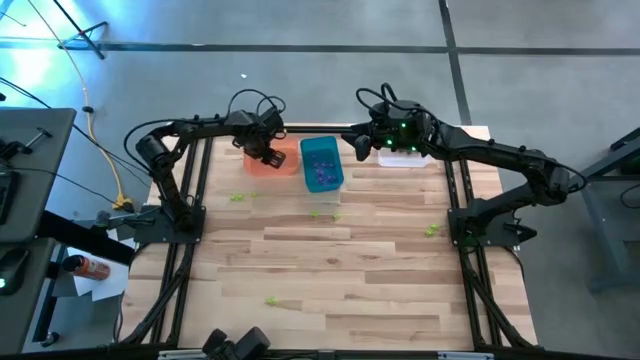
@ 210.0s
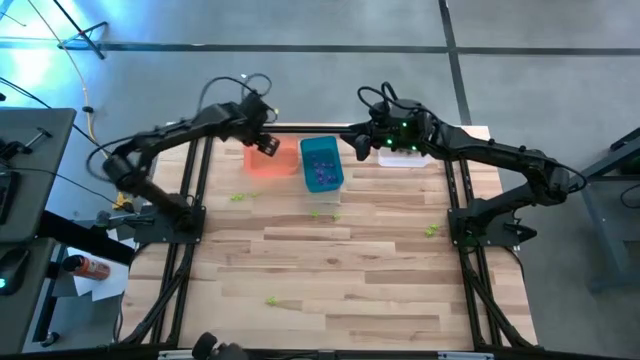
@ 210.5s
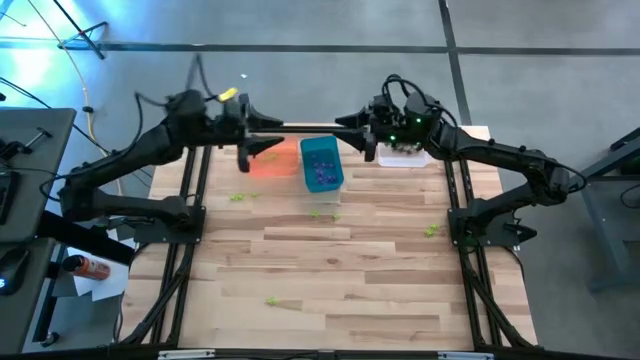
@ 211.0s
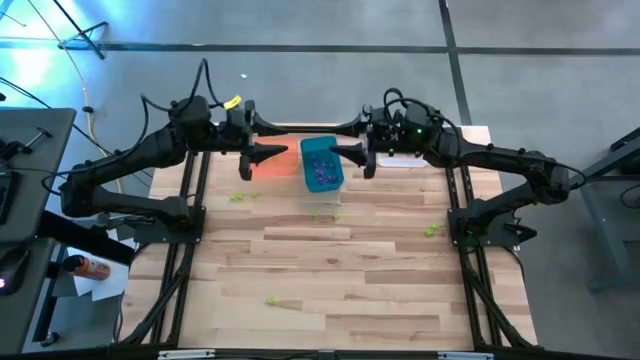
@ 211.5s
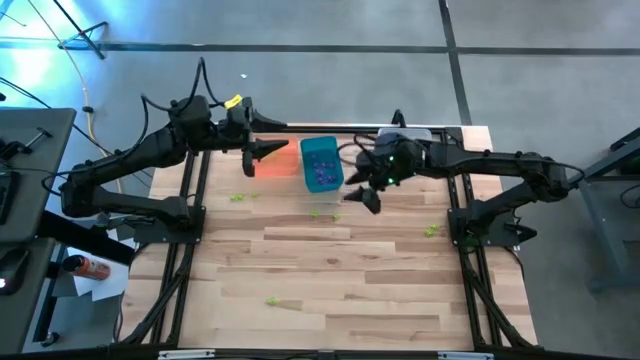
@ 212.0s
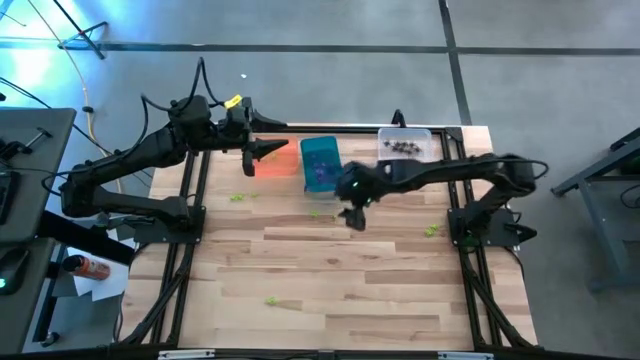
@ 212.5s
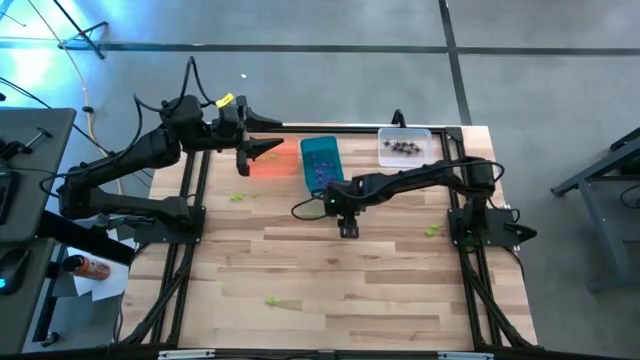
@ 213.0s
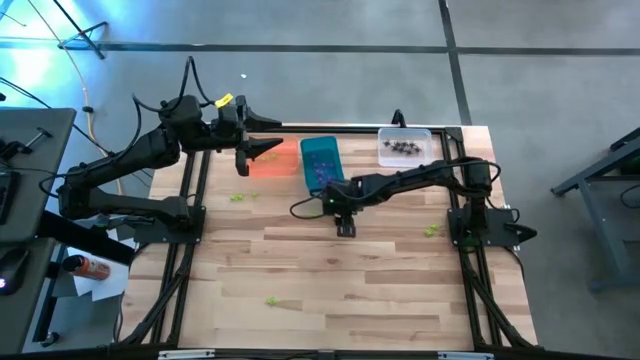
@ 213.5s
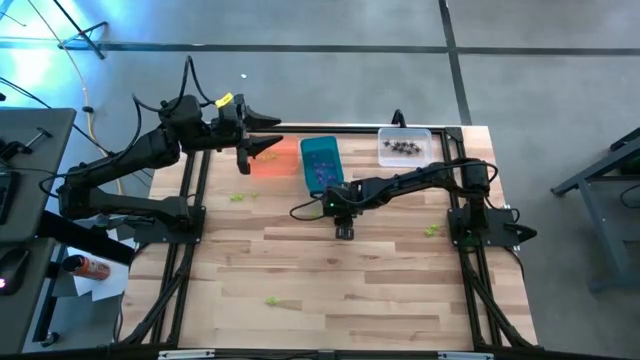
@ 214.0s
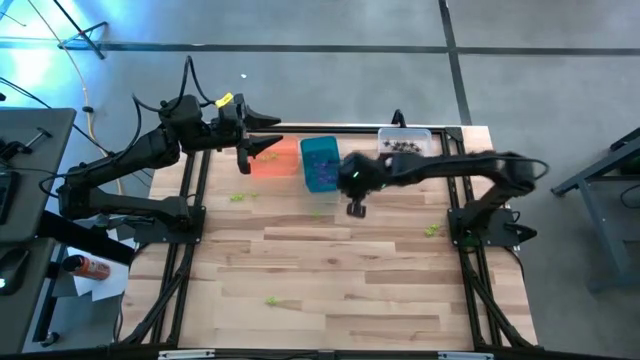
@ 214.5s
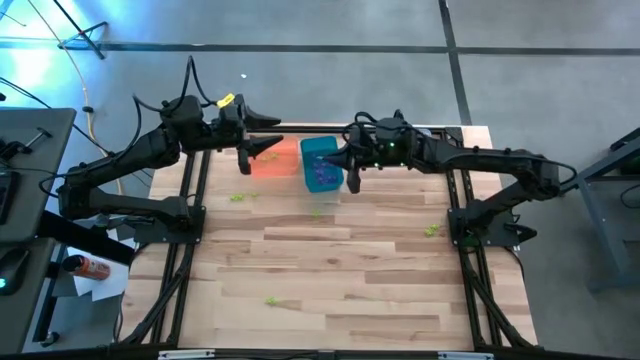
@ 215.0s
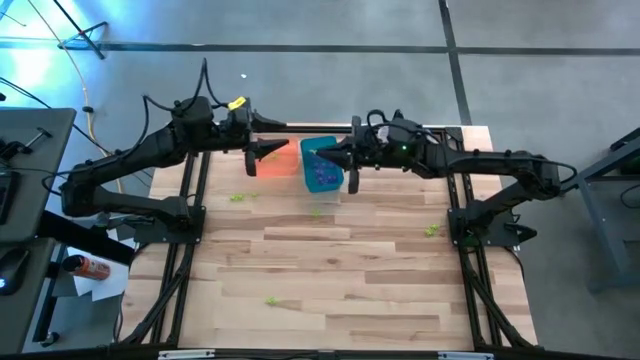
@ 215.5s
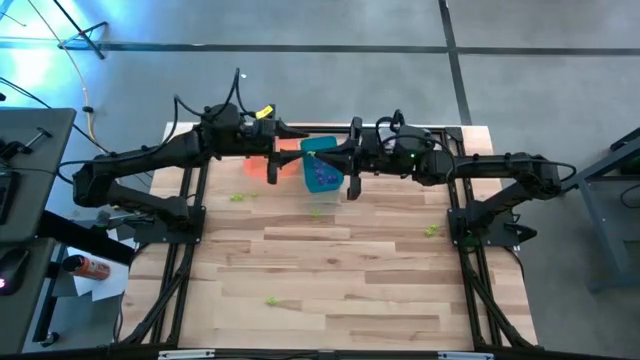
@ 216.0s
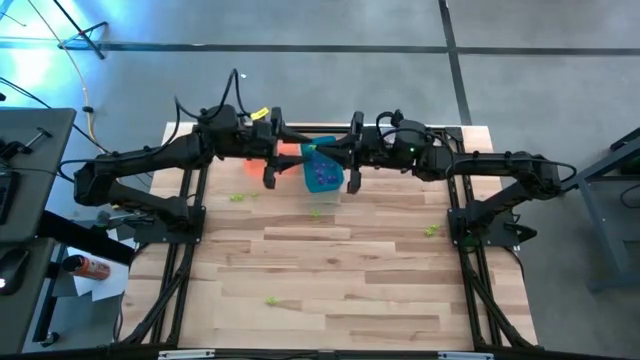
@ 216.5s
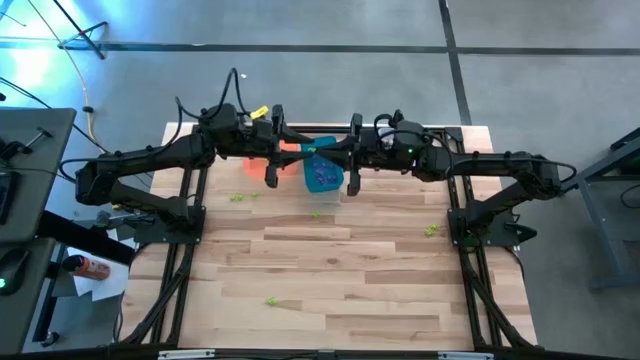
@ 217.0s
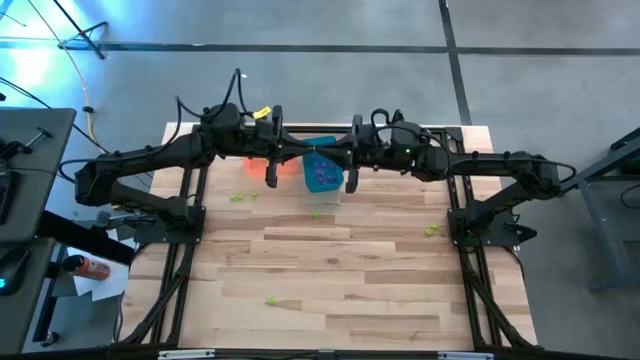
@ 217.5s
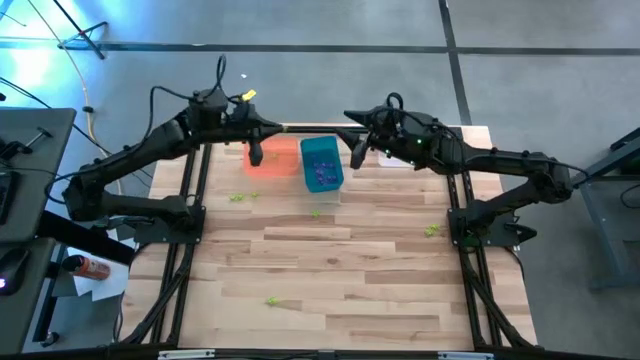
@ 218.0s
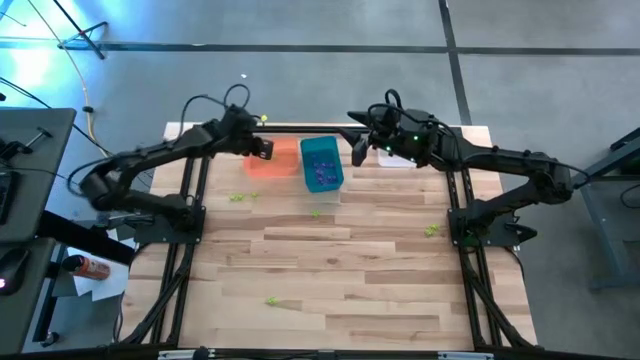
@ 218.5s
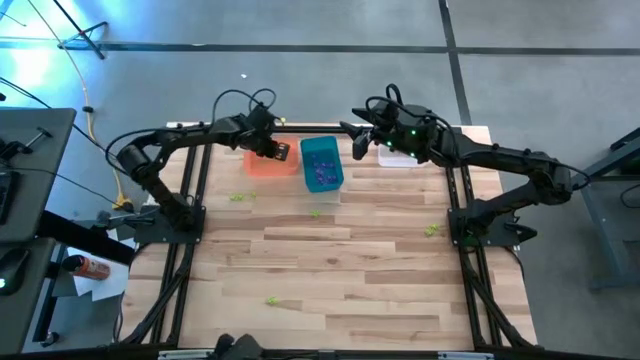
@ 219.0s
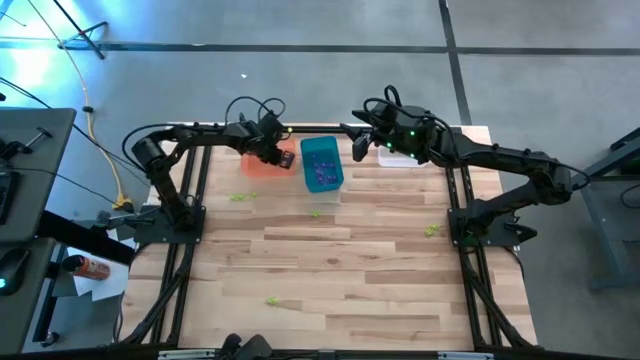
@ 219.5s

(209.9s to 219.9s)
Task: Sort Halloween decoration
Put the green spider toy into the orange bin

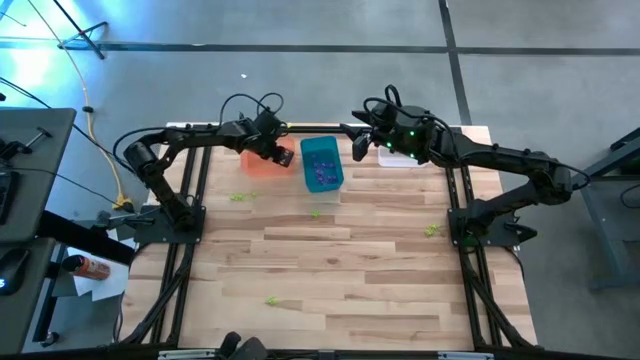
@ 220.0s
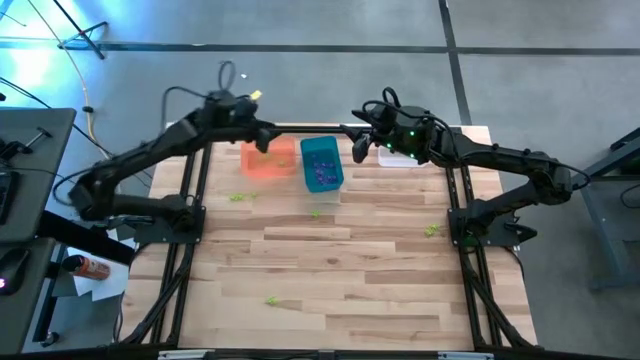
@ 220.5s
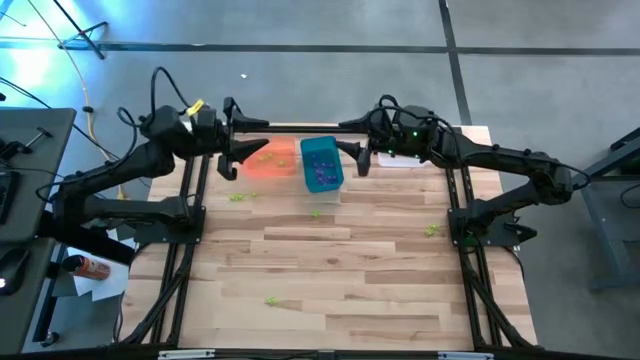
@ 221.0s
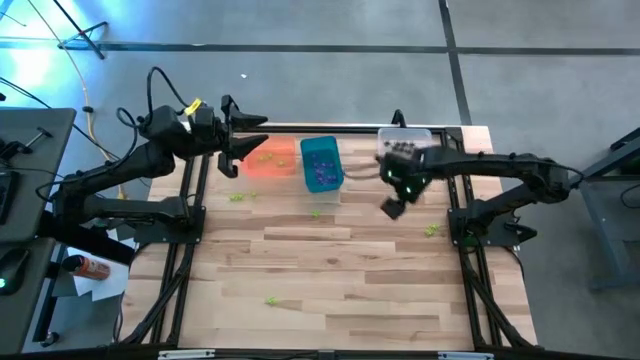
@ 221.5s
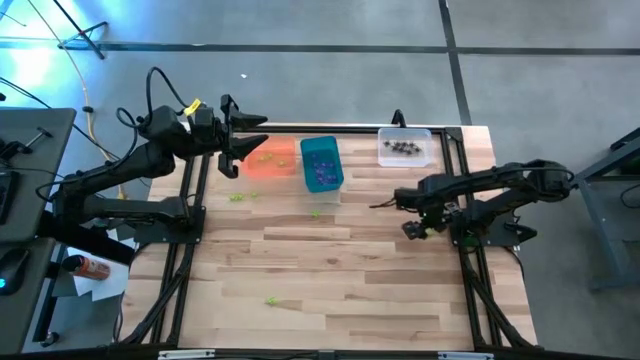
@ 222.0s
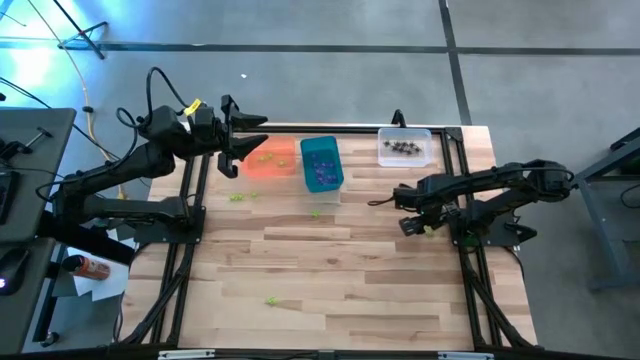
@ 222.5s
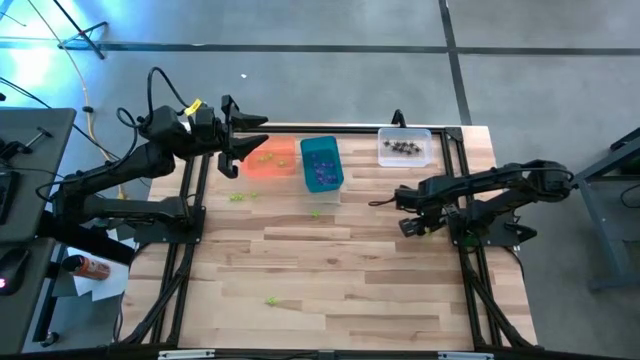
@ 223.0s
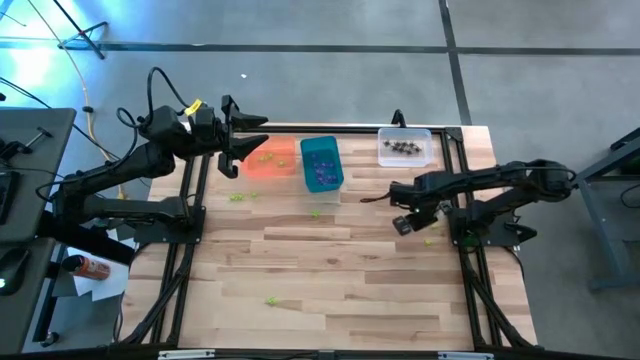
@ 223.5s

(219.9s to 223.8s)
Put the green spider toy into the orange bin

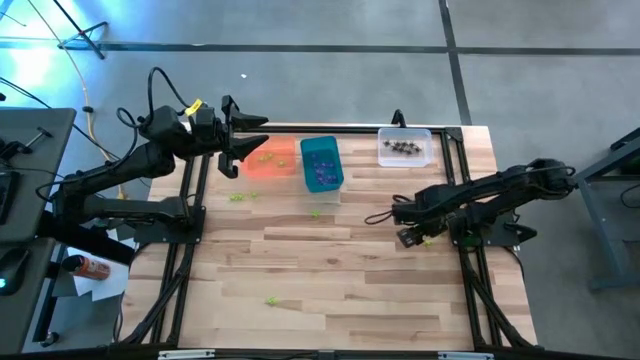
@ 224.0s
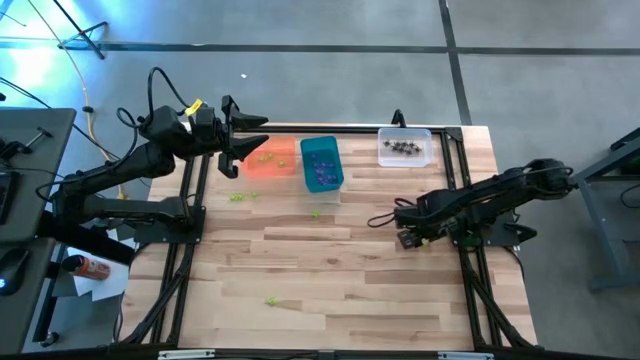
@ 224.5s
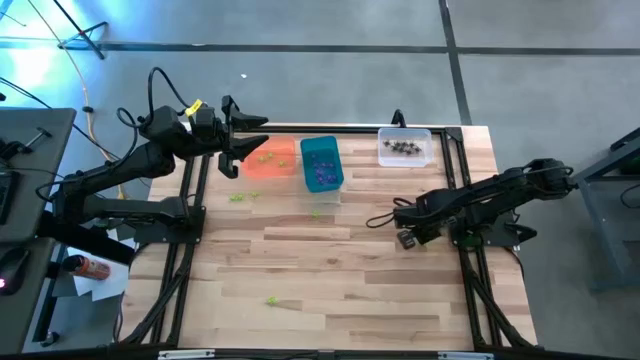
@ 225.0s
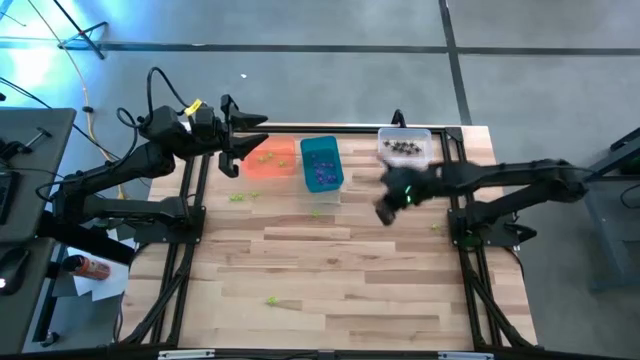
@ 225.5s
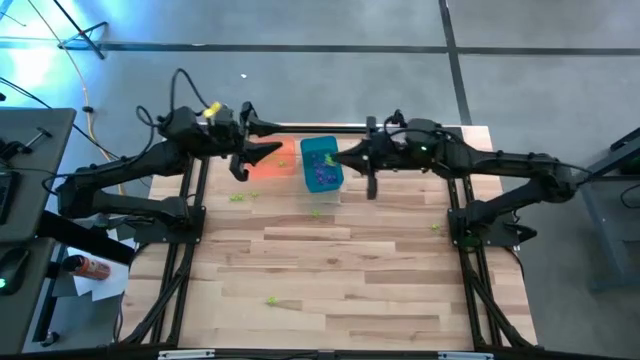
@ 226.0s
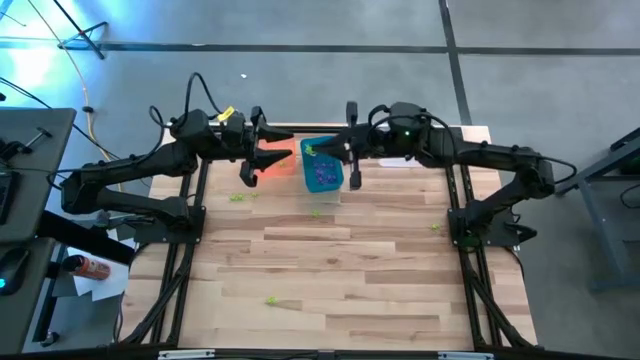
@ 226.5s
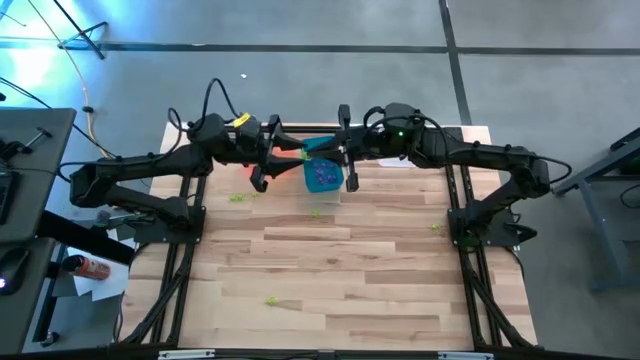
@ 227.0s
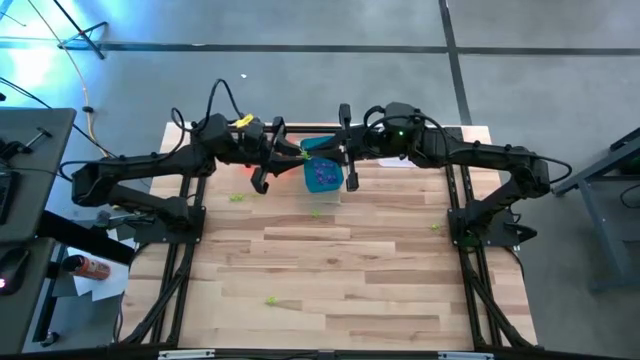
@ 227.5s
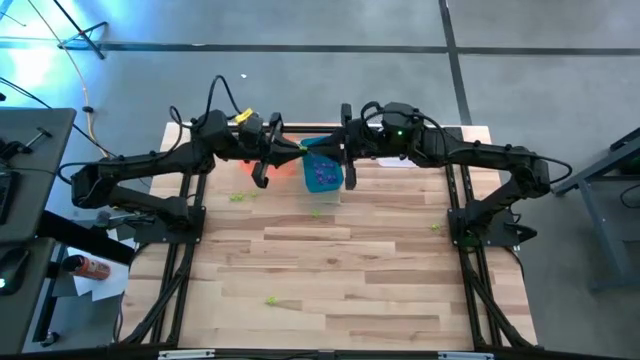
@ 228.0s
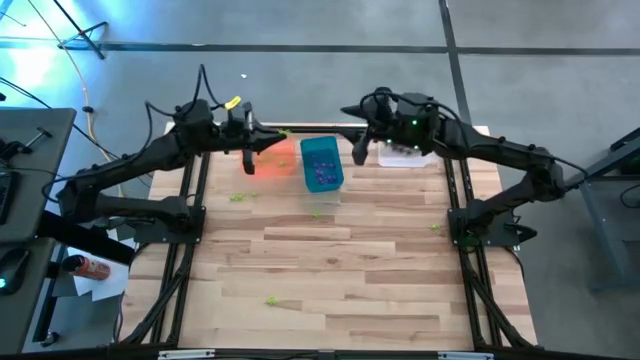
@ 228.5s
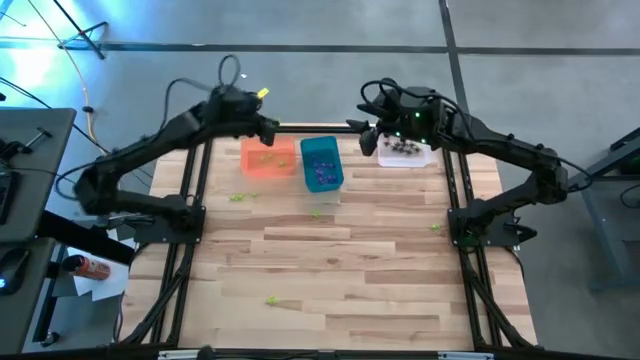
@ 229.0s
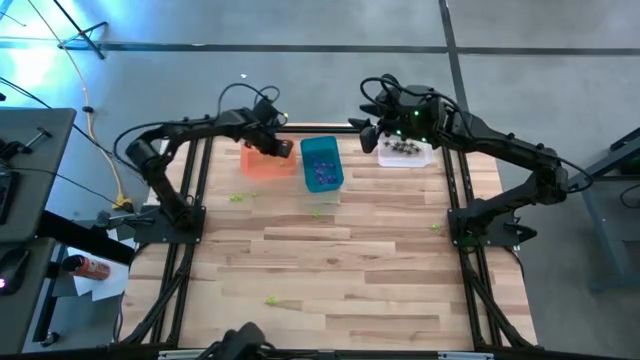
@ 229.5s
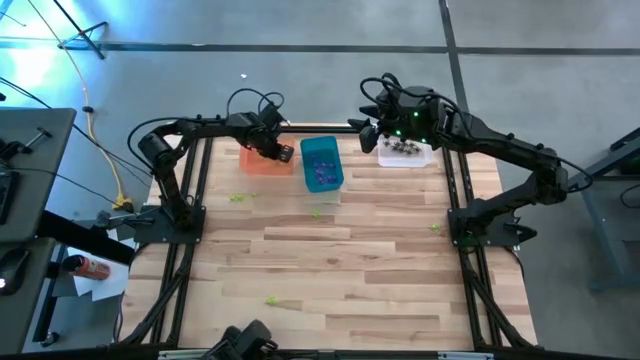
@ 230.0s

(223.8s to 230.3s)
Put the green spider toy into the orange bin

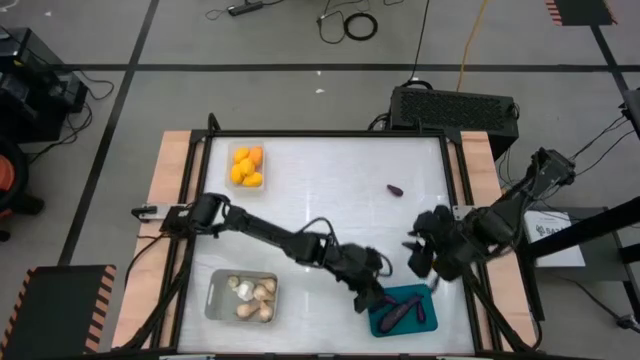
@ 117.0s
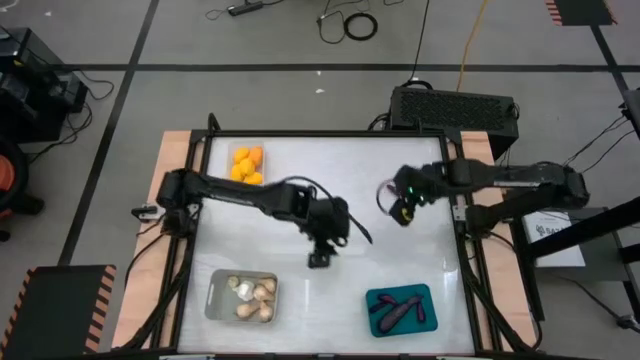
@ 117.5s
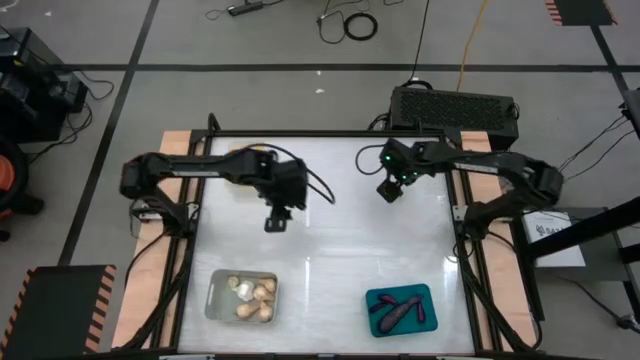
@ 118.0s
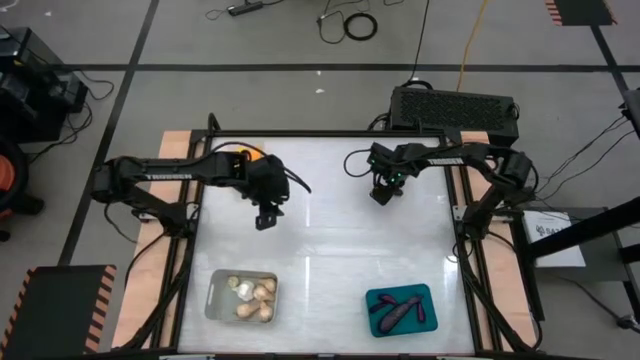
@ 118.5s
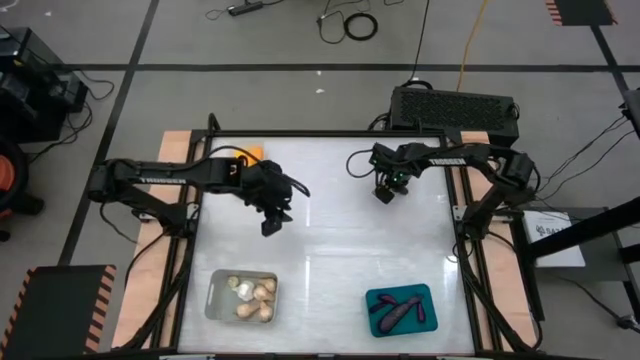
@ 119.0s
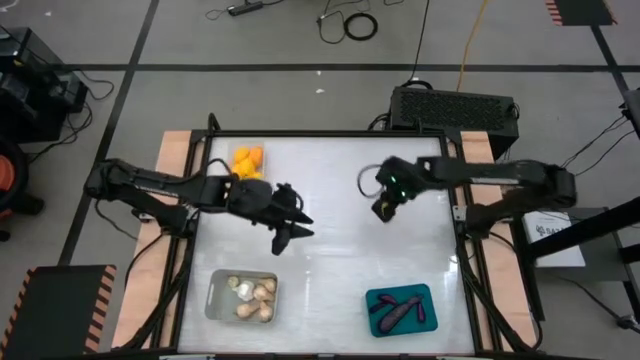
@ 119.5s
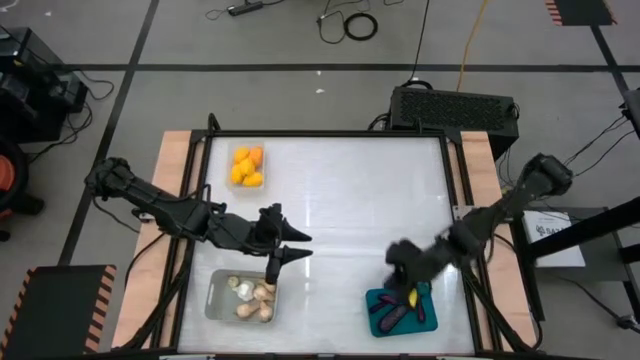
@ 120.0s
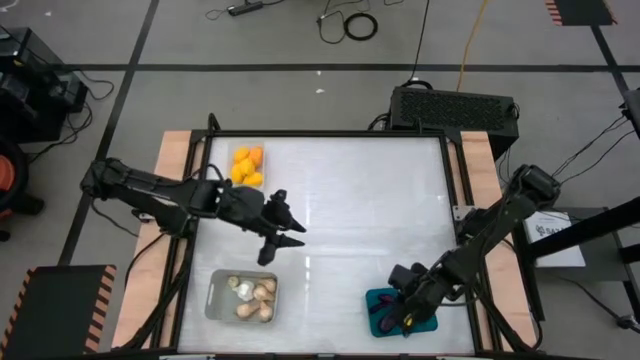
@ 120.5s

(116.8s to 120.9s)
Task: Sort produce into baskets
Put the purple eggplant into the blue bin
